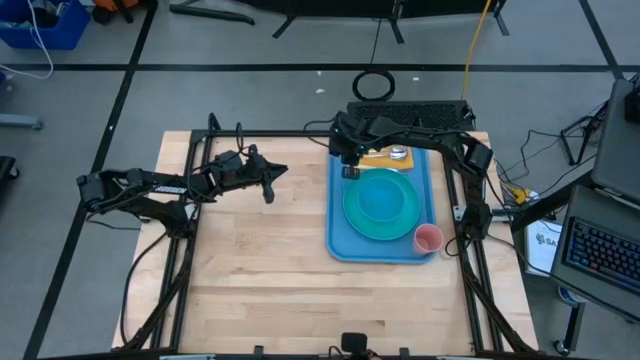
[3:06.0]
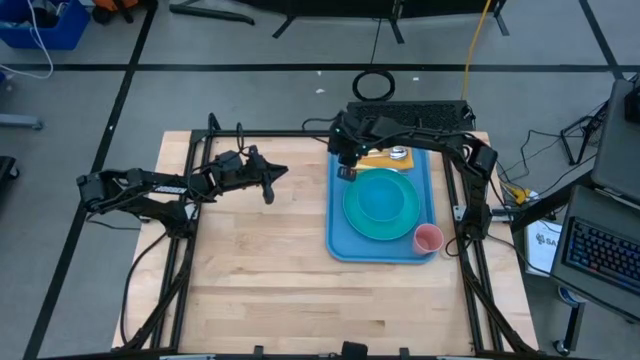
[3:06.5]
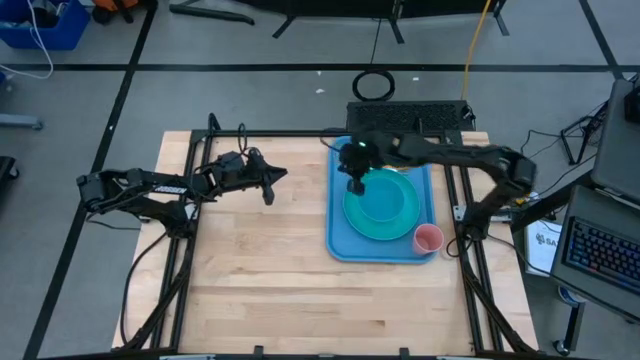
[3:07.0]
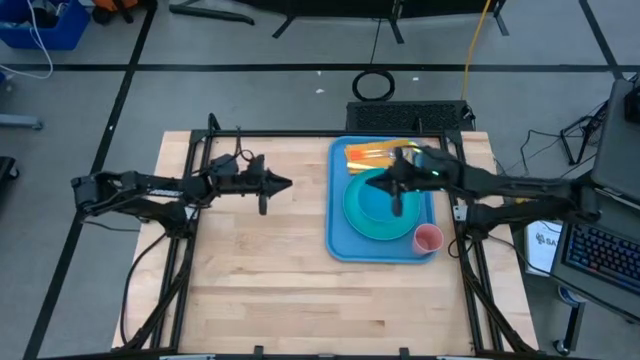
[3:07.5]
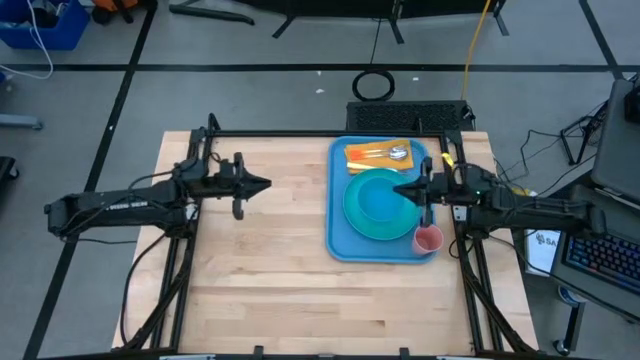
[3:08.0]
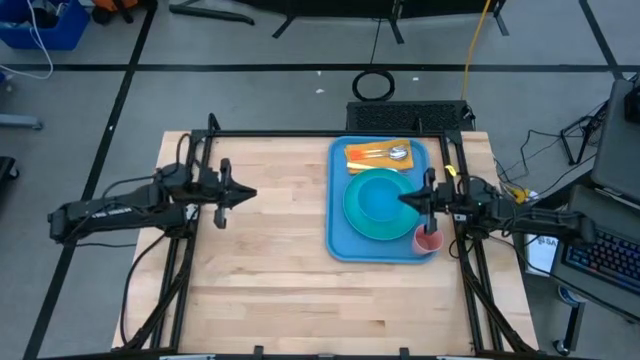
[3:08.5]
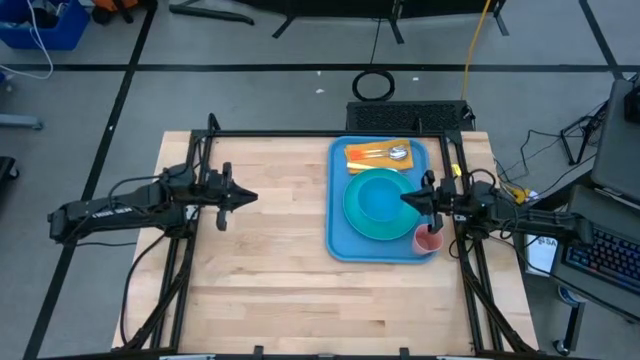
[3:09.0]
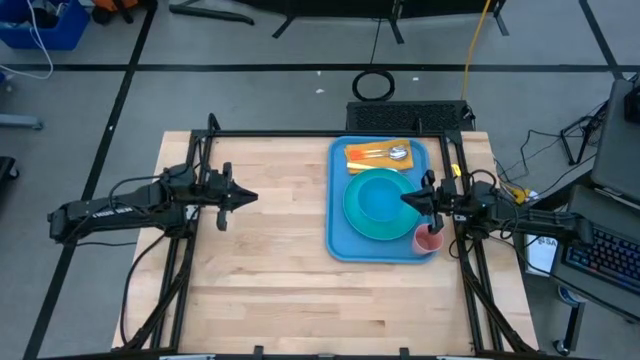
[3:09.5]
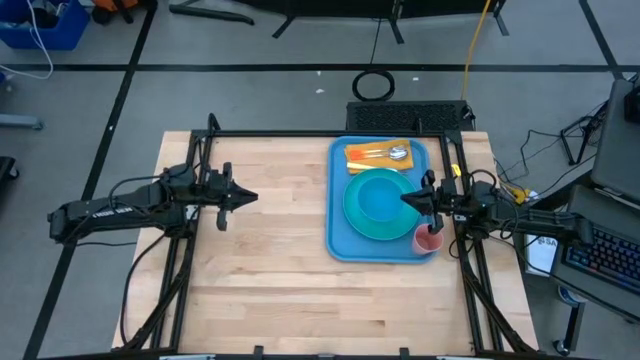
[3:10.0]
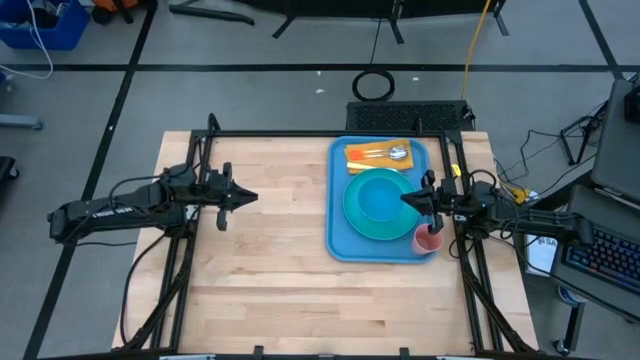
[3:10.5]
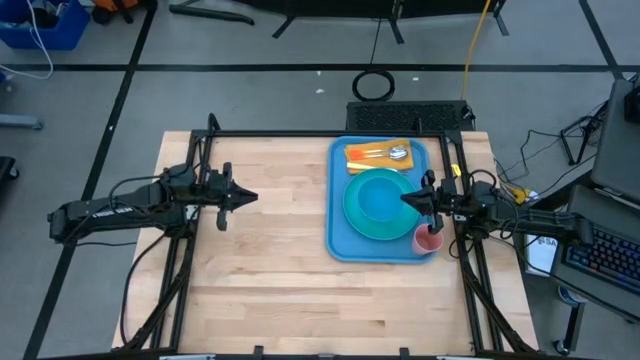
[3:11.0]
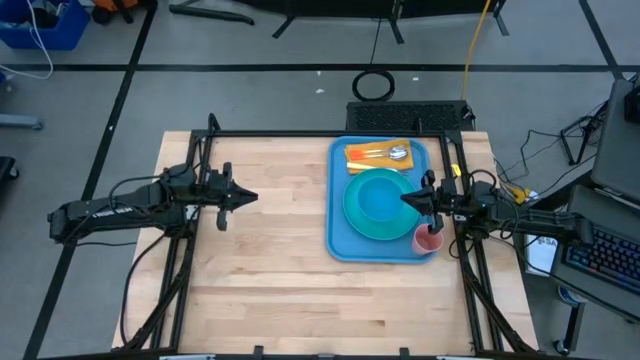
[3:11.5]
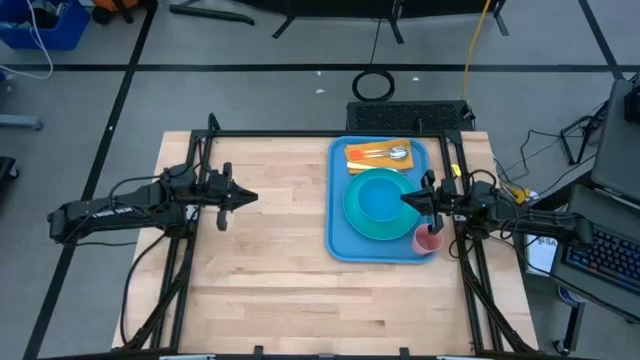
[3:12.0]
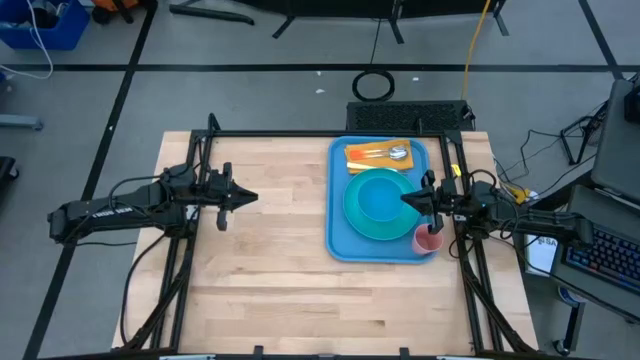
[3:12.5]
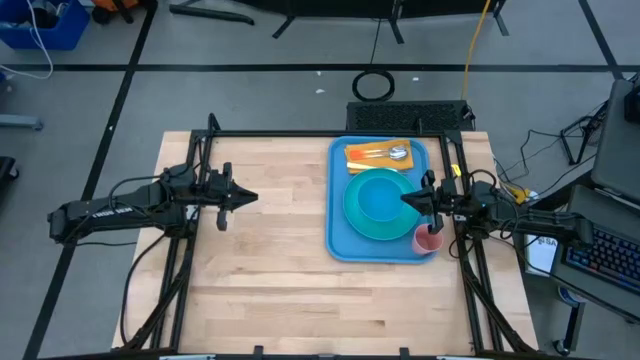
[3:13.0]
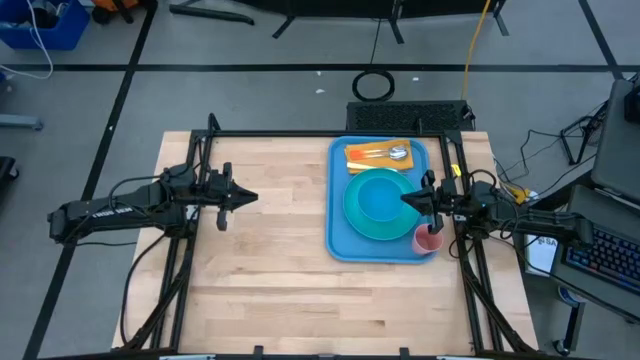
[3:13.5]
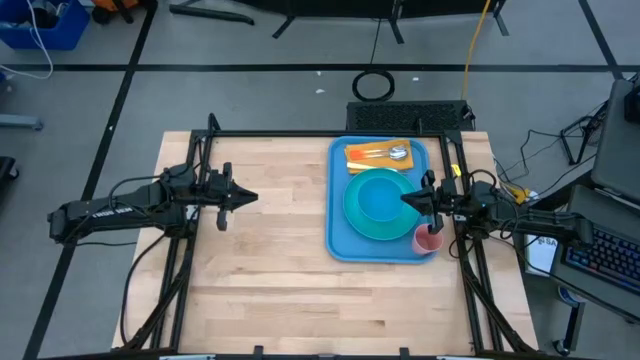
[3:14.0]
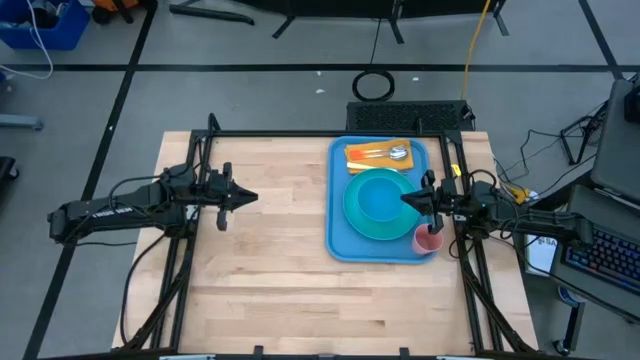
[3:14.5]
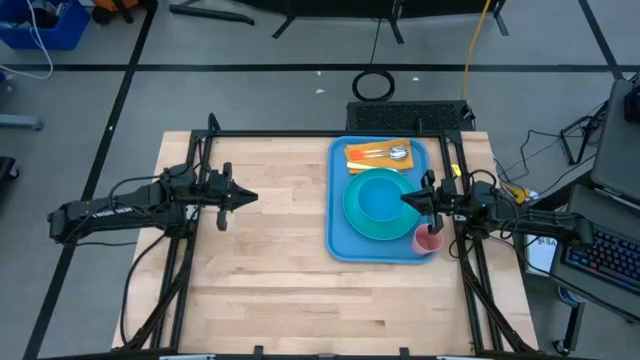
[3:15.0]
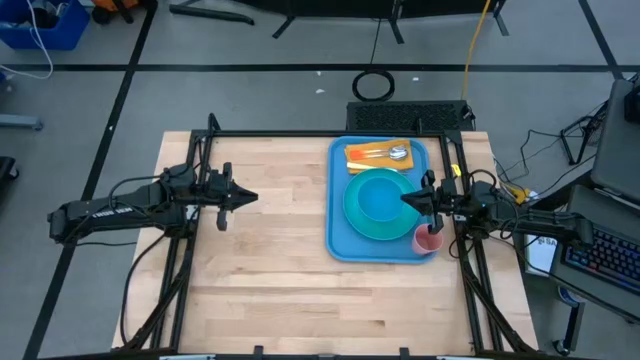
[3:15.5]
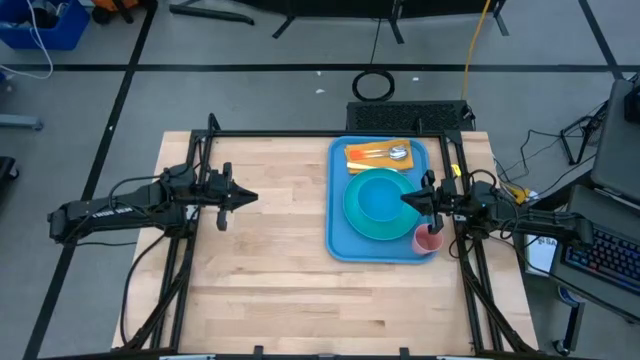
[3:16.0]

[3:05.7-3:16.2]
Task: Set up tray
Return to Home Position

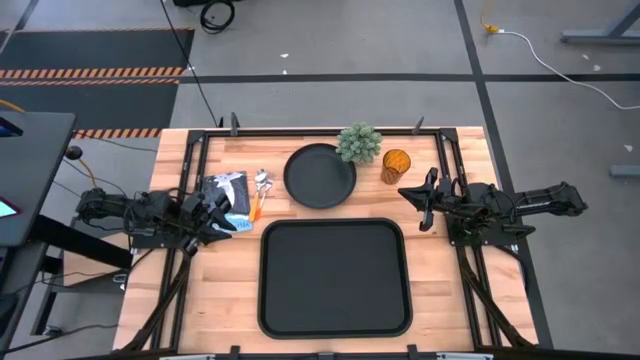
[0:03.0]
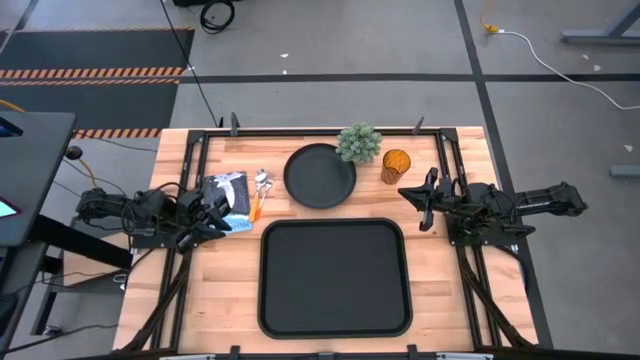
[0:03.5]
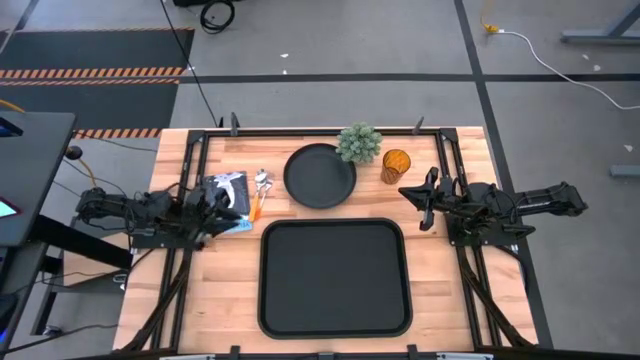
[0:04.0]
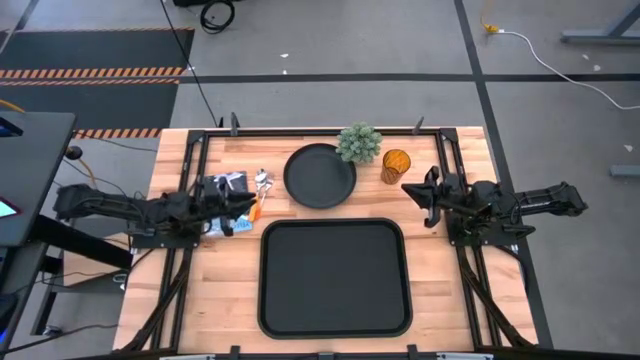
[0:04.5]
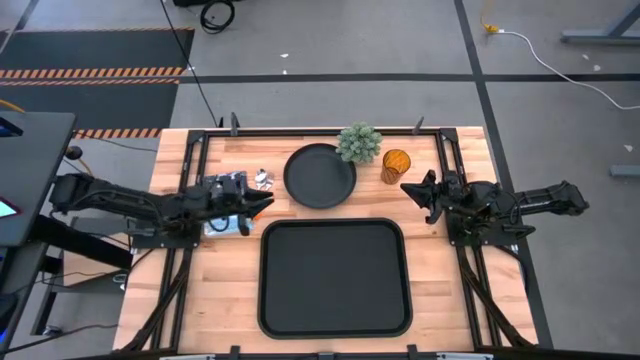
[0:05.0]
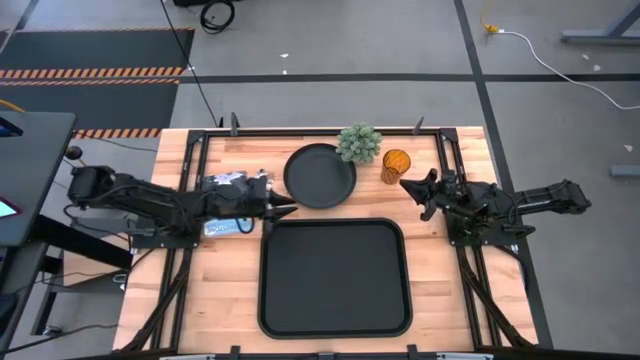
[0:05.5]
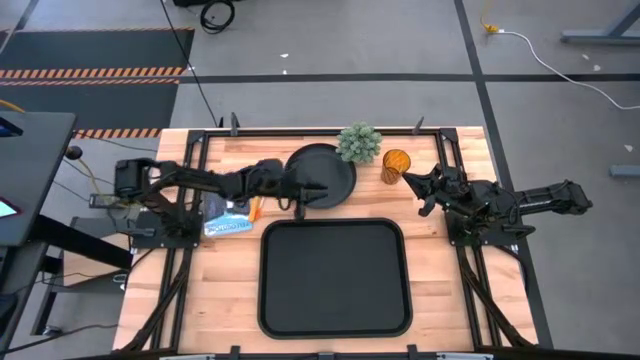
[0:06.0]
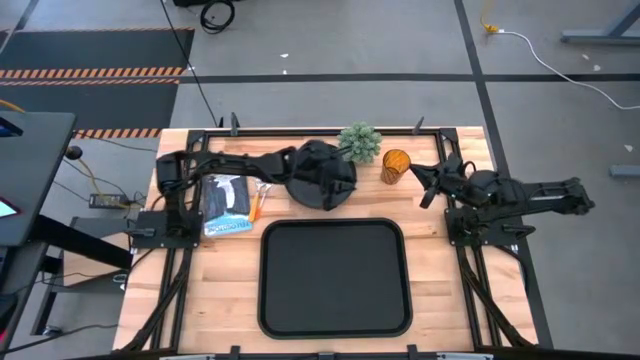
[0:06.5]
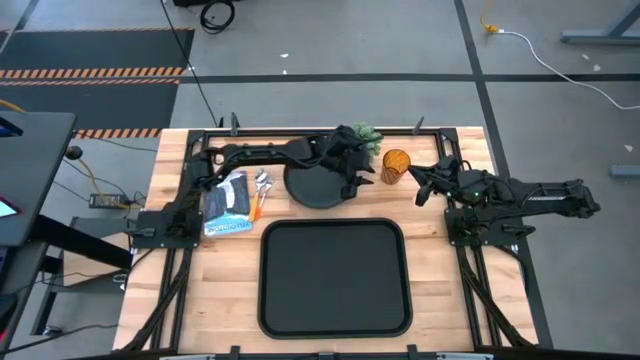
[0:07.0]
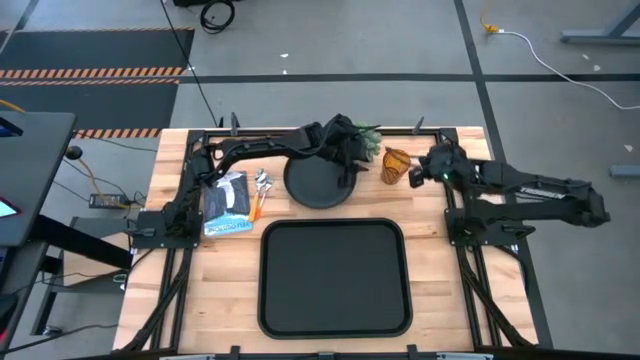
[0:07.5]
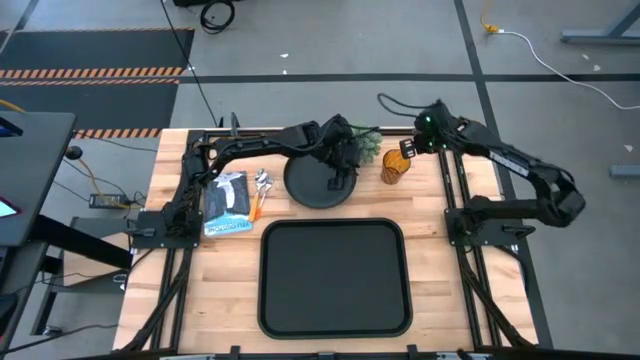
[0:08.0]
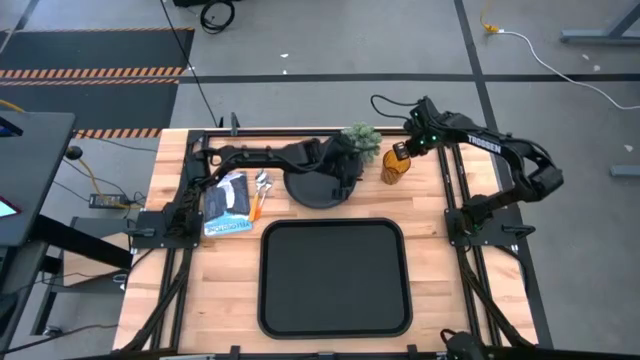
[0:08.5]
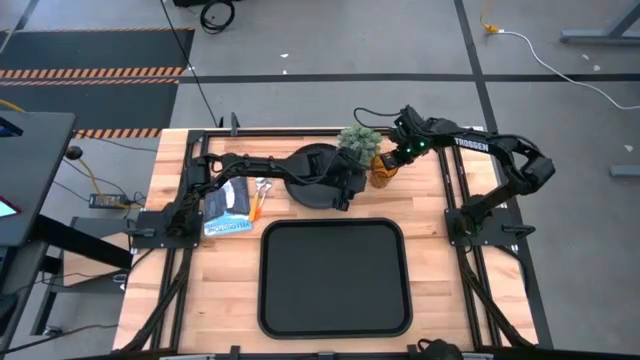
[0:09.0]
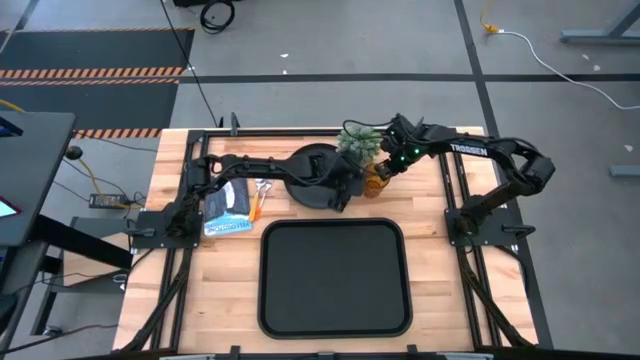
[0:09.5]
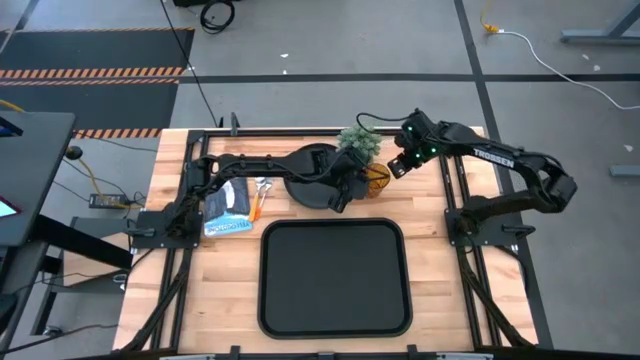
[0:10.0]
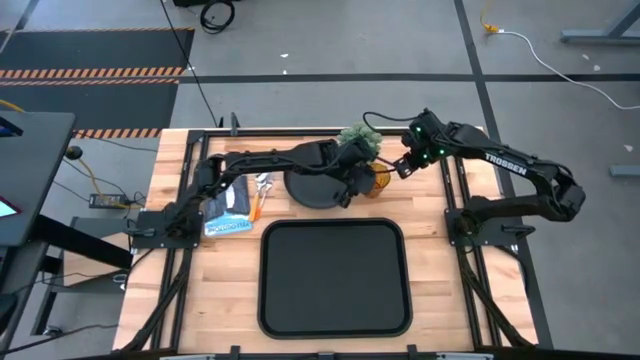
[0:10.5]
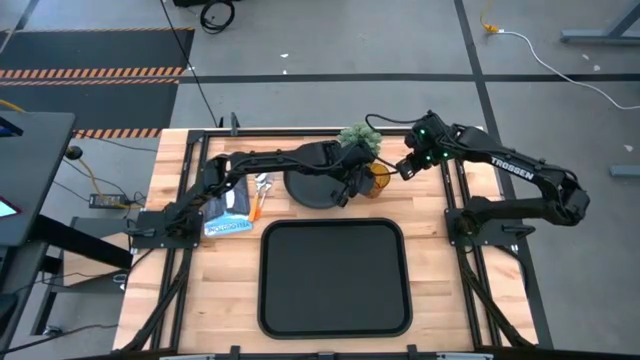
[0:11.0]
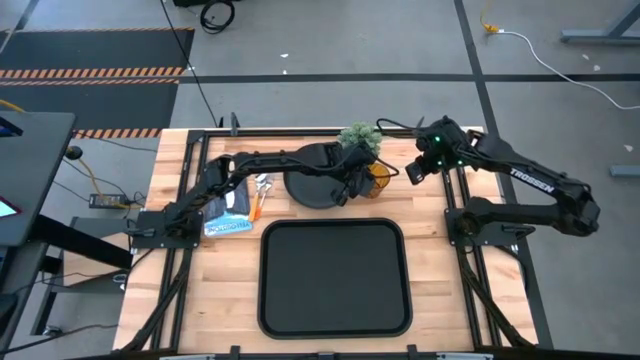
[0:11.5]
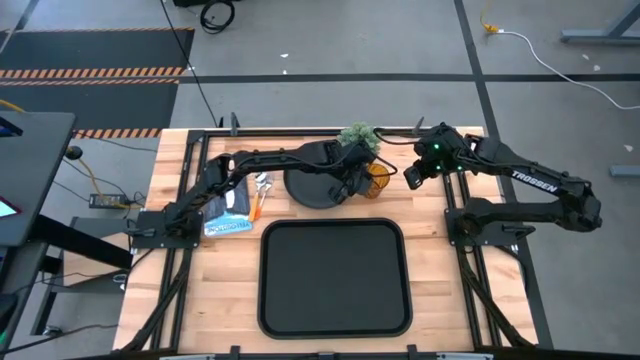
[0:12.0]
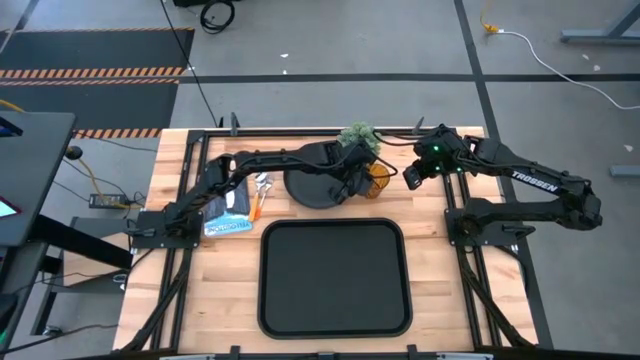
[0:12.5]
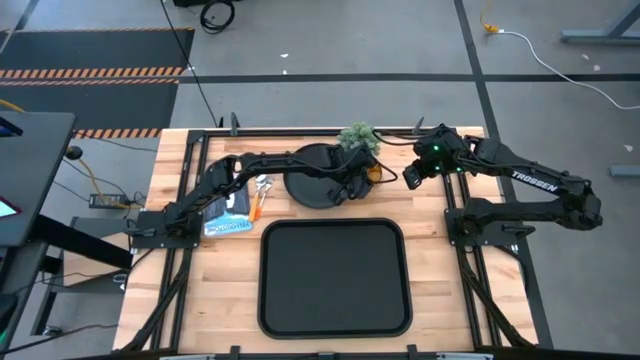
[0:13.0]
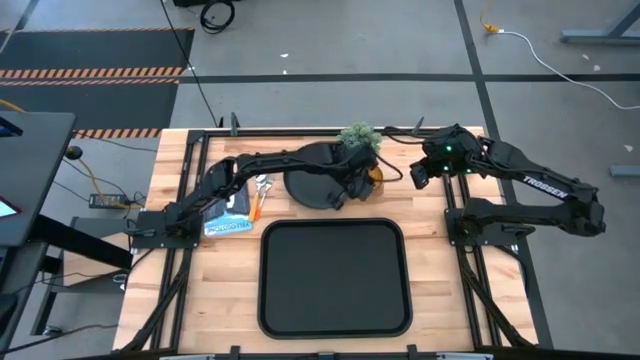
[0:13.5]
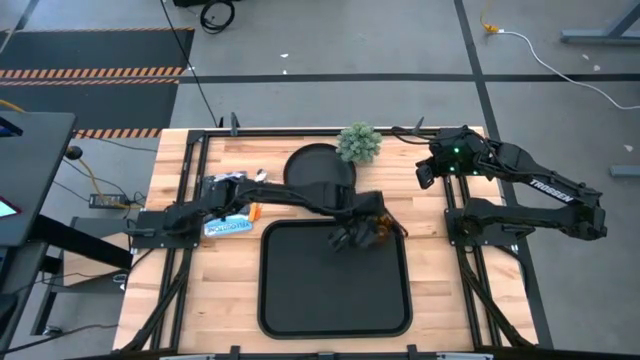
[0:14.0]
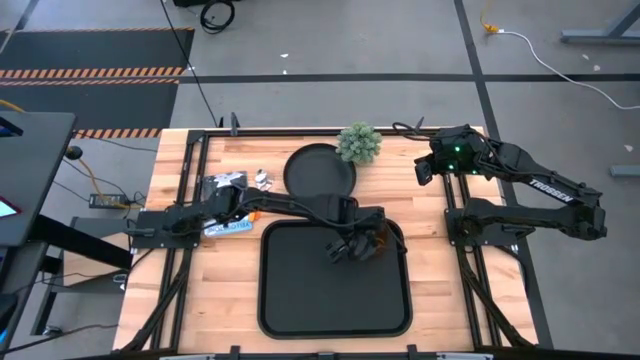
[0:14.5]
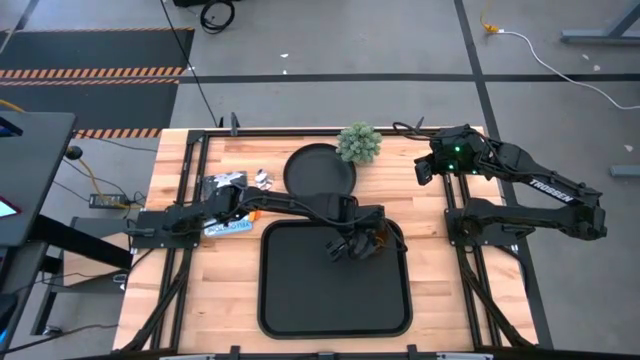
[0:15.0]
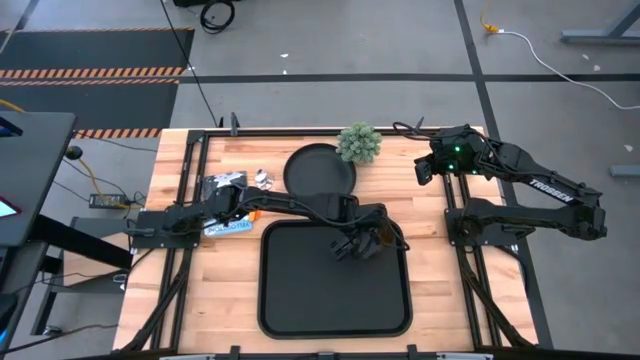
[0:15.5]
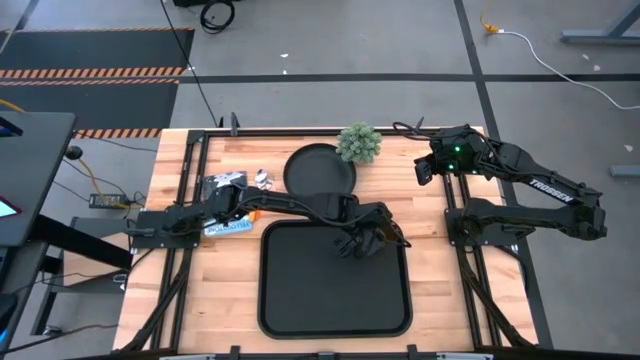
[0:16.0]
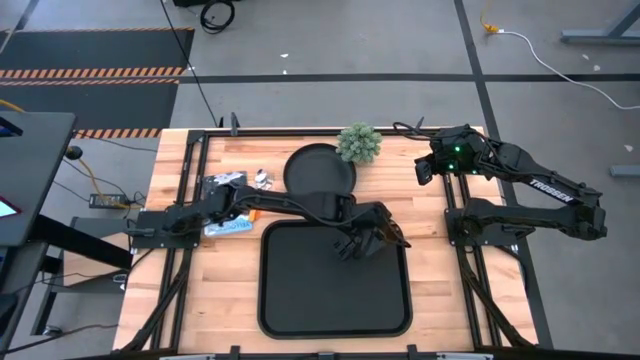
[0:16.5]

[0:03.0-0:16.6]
Task: Pick and place plate/cup/fork/spoon on tray
Put the yellow cup on the top right of the black tray
